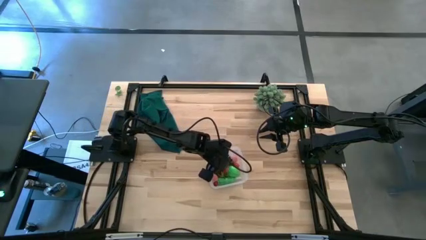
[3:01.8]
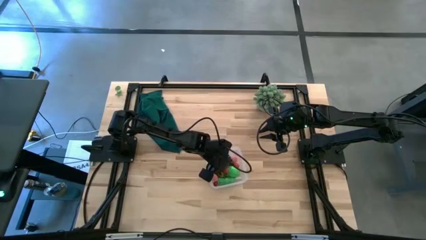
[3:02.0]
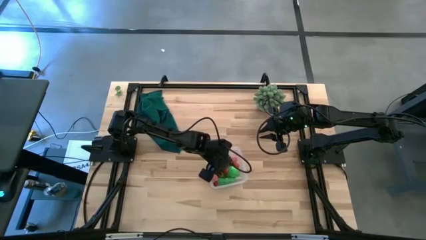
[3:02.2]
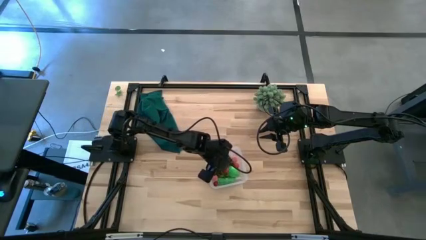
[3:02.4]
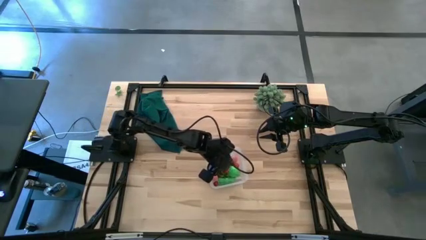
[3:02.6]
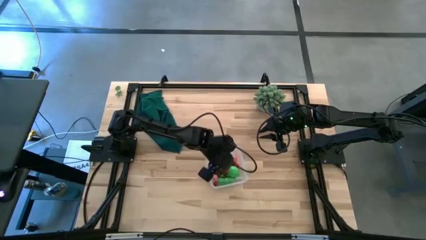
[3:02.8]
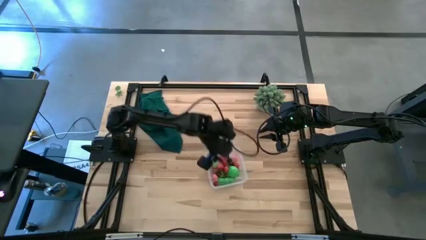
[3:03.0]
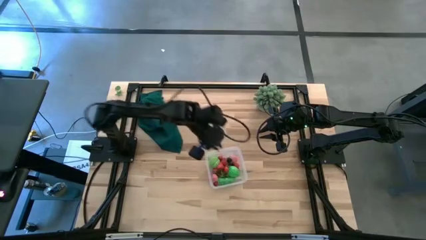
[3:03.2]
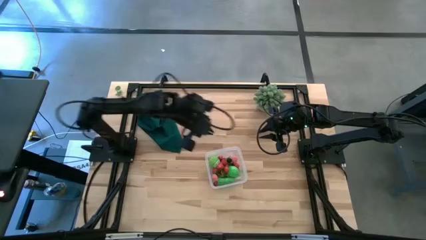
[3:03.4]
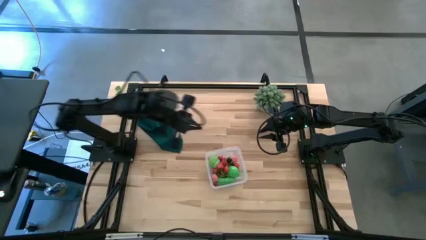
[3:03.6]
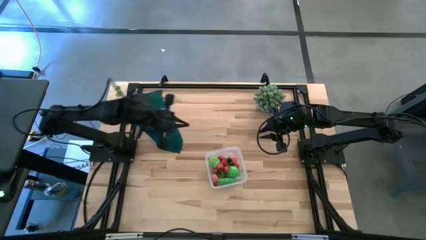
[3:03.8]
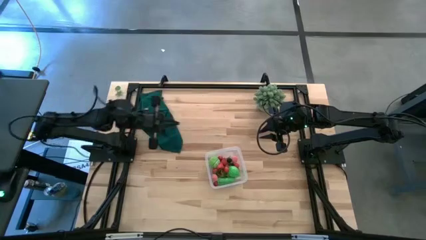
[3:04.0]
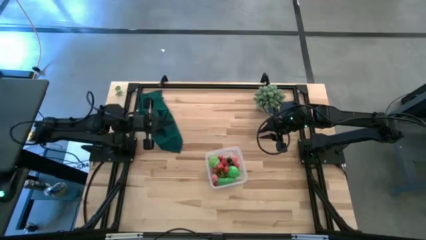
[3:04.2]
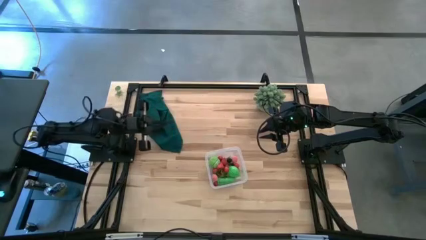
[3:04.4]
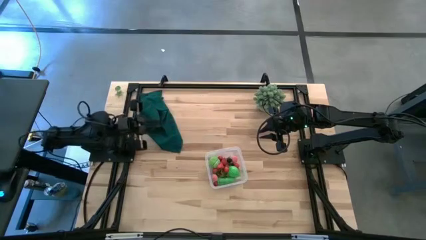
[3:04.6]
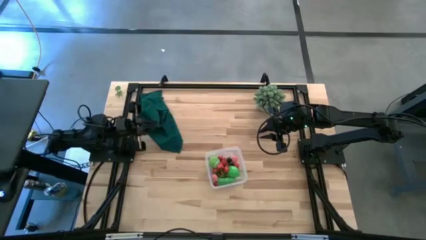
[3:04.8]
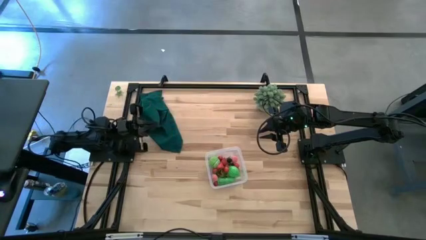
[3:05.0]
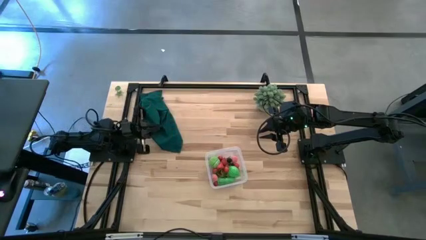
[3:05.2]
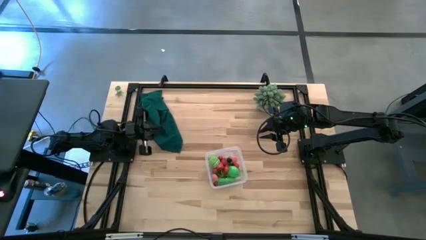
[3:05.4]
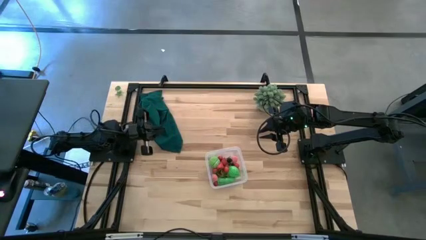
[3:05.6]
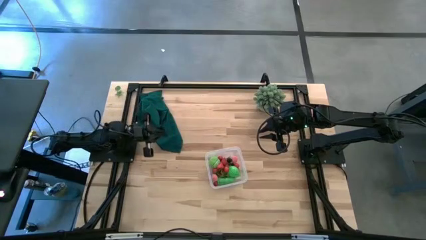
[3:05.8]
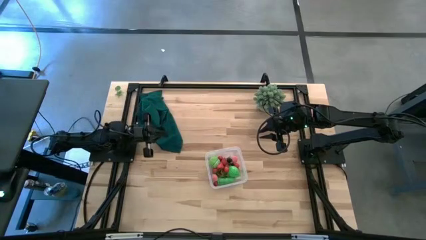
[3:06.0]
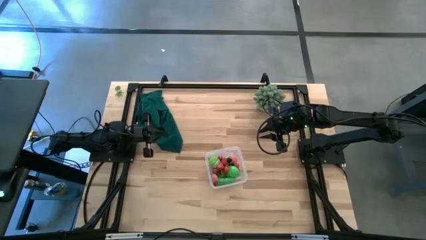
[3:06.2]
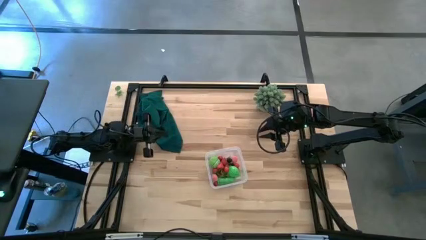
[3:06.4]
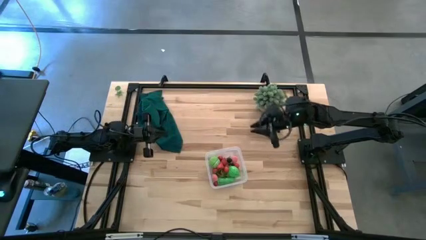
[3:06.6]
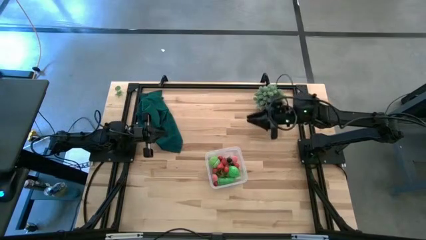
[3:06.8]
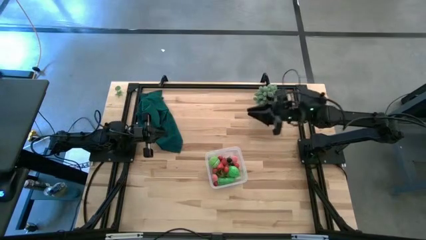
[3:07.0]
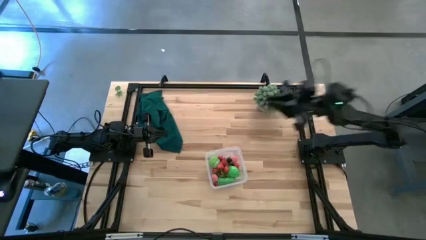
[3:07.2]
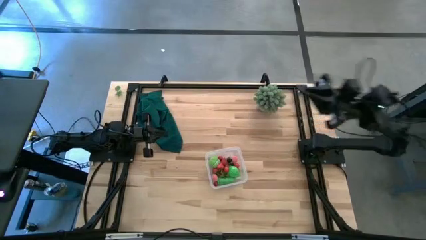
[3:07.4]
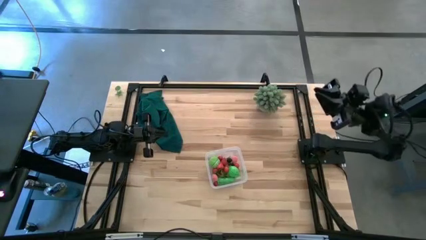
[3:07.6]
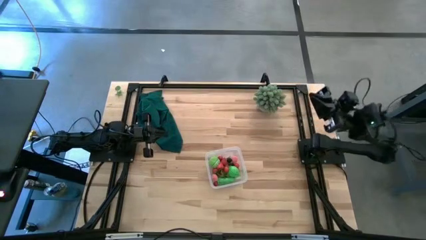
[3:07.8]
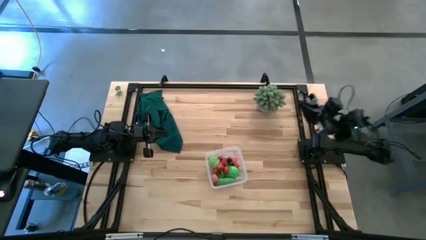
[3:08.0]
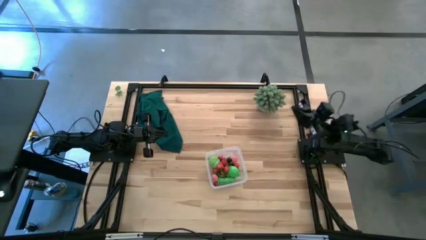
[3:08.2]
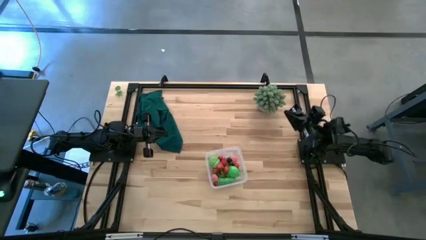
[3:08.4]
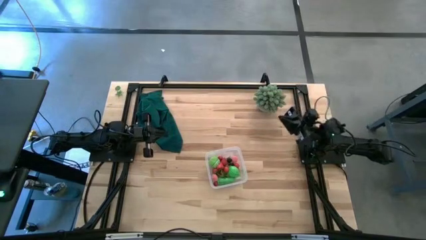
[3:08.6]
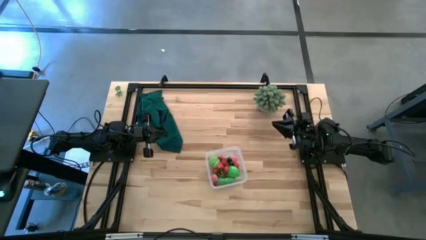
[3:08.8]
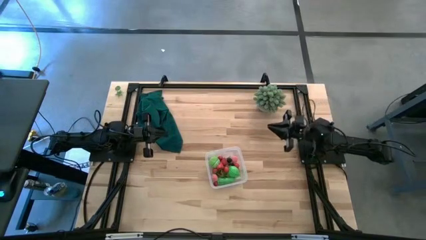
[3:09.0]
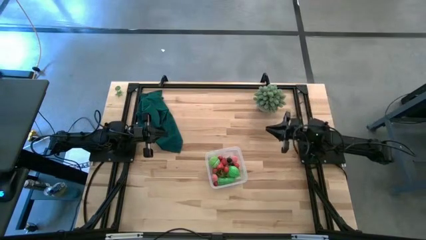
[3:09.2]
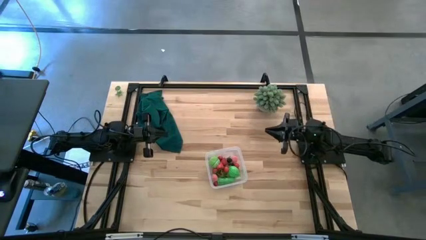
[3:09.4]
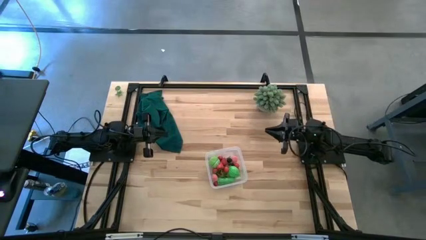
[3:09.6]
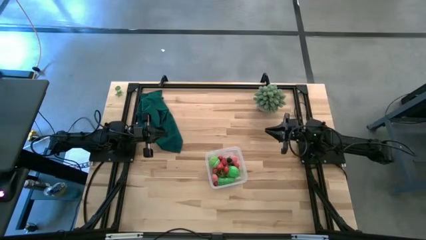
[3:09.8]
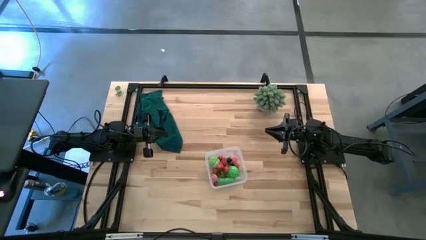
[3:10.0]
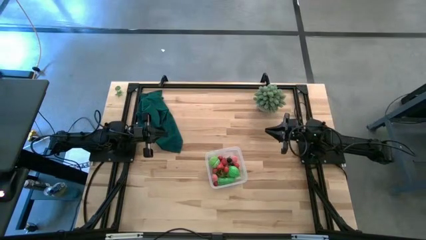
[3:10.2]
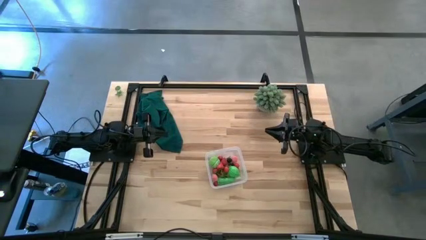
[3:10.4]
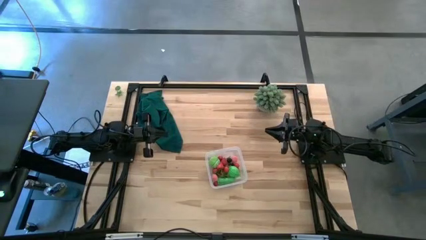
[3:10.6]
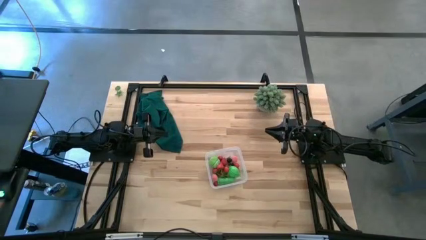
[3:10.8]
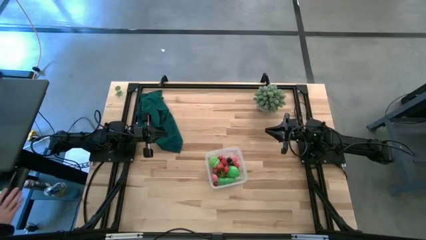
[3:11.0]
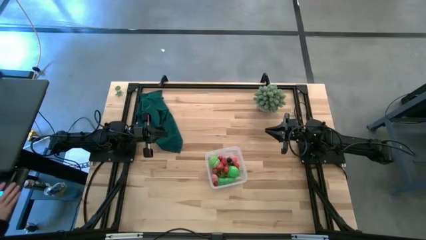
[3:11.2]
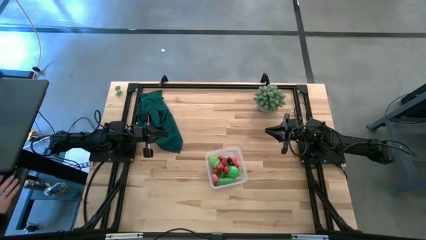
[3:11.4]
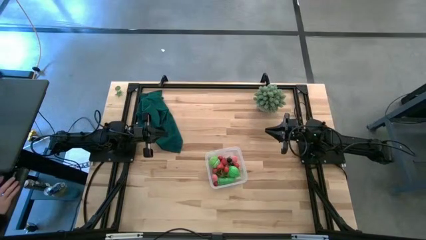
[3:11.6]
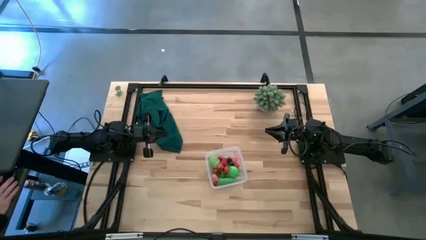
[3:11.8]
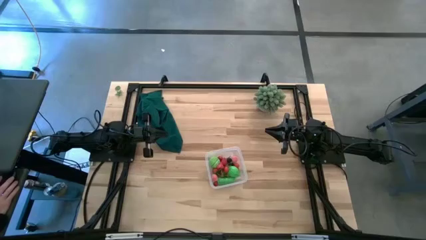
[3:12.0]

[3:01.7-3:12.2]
Task: Pick and placing Produce into tupperware
Return to Home Position

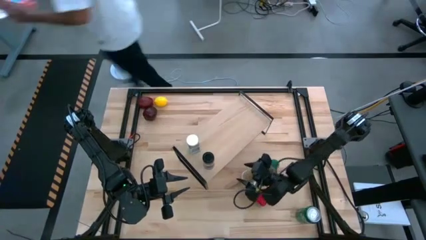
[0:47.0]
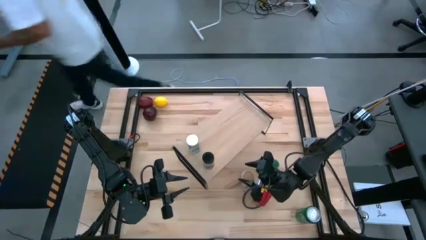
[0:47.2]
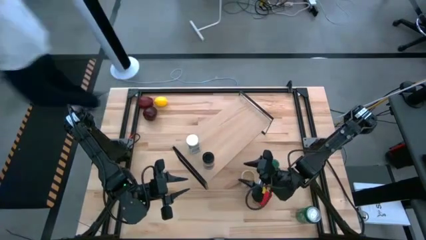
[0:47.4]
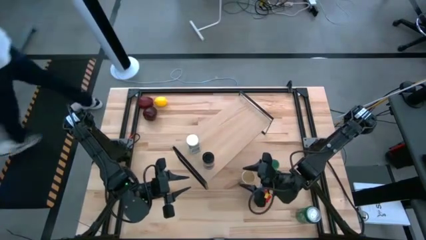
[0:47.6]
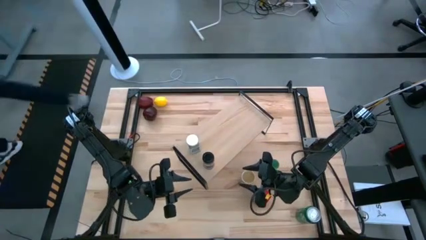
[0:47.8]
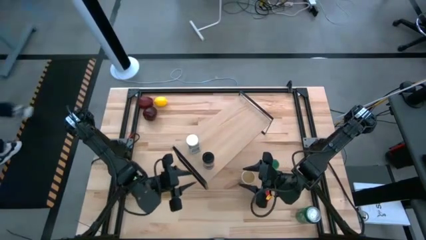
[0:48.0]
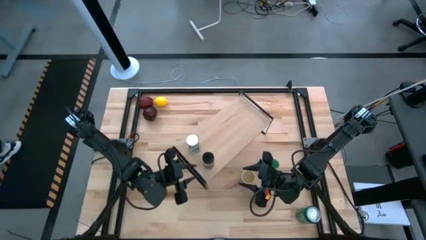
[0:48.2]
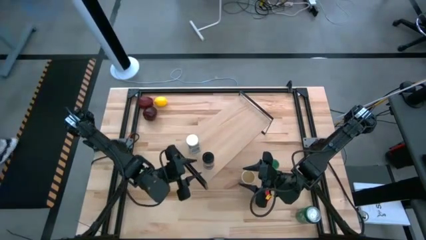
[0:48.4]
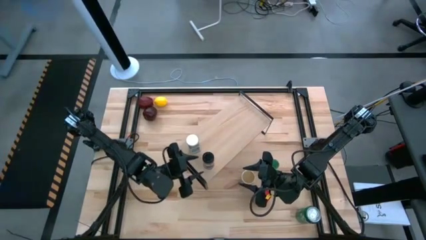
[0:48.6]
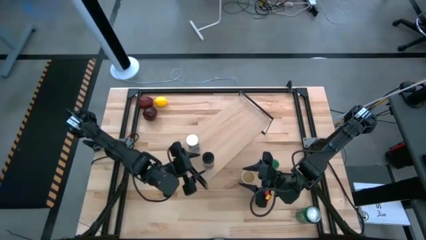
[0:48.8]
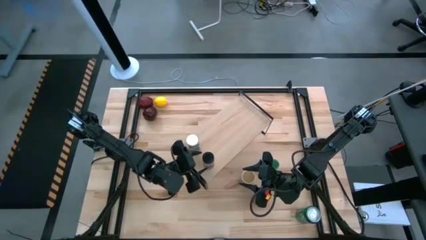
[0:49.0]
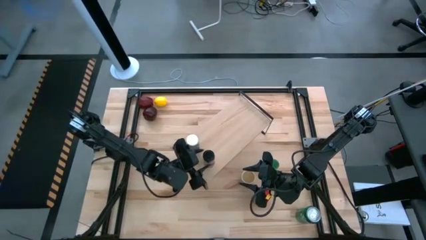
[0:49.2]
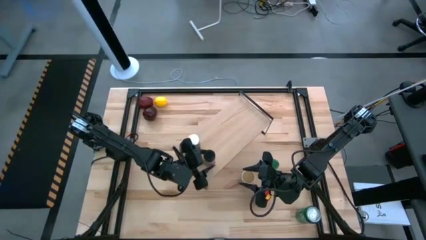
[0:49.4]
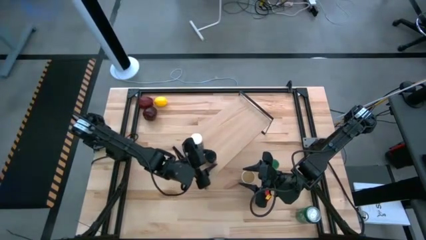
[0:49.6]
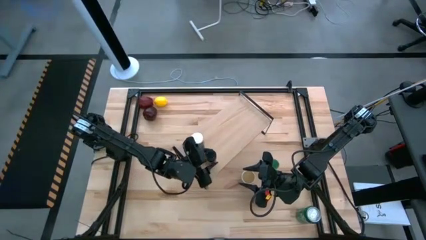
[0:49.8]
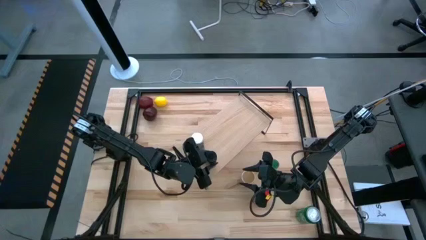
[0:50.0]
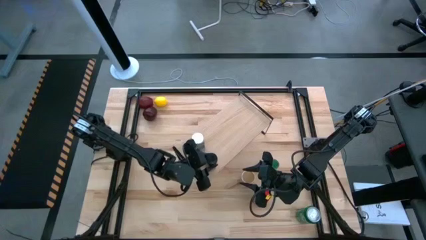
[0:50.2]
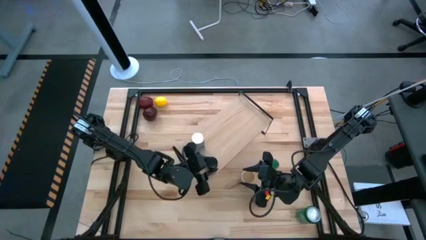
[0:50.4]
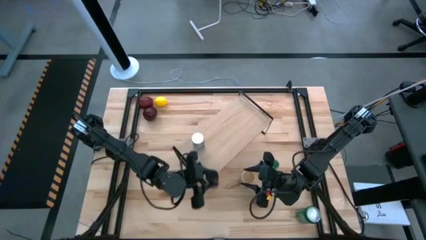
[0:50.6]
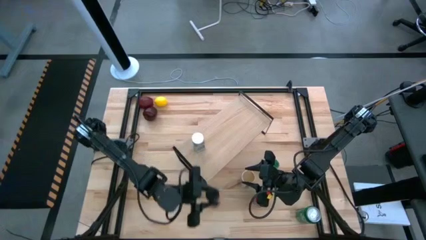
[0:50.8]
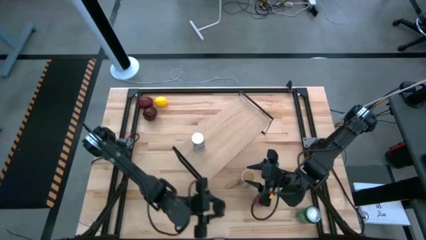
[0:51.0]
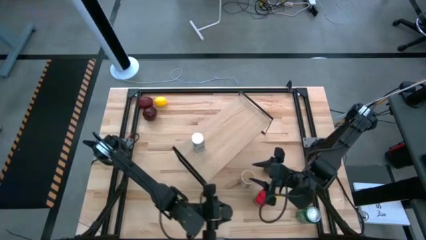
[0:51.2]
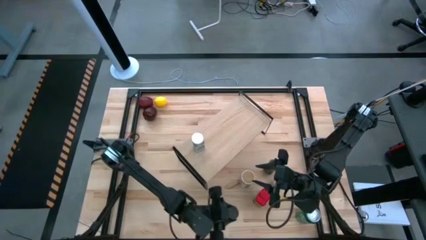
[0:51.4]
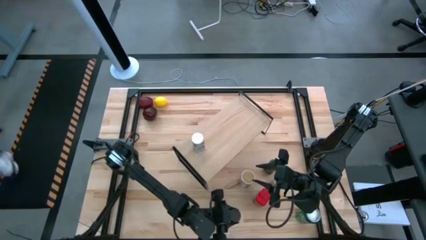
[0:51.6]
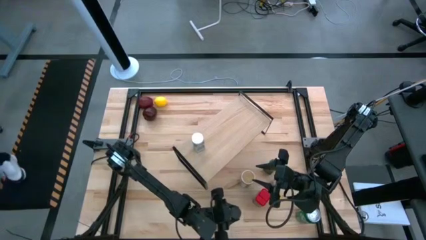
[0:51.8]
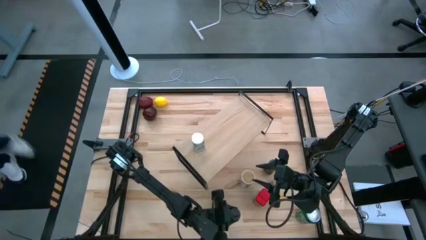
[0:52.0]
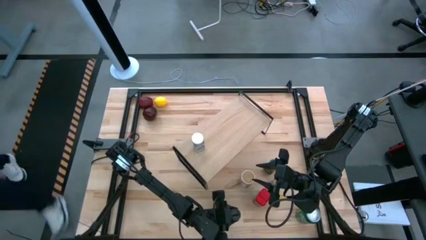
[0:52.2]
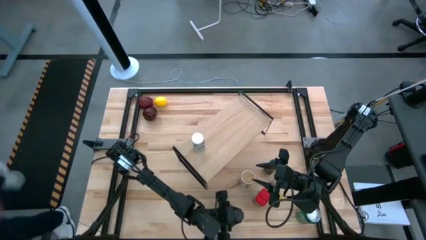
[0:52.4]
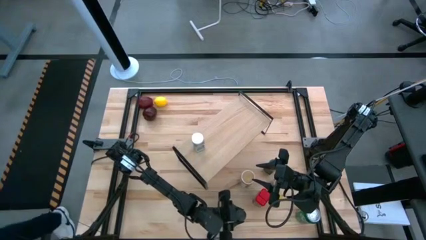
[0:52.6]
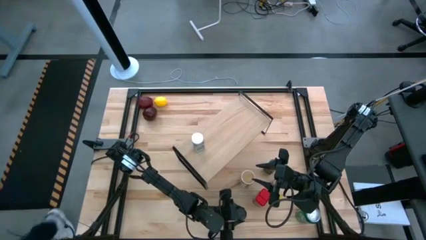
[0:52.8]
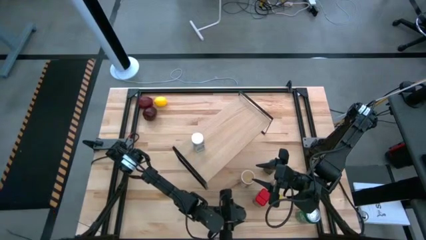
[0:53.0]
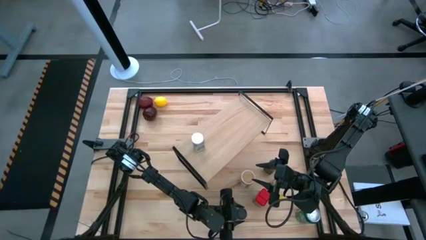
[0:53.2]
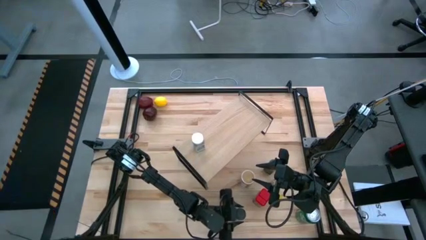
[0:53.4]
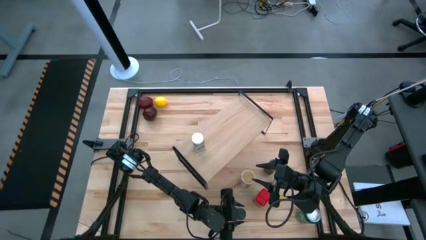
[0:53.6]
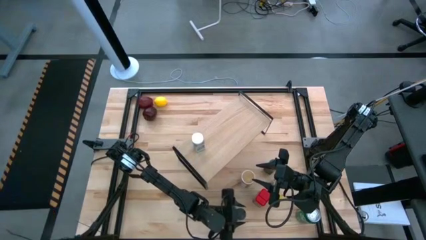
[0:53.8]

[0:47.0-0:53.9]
Task: Shelf spices
Remove the black seasoning bottle from the shelf
